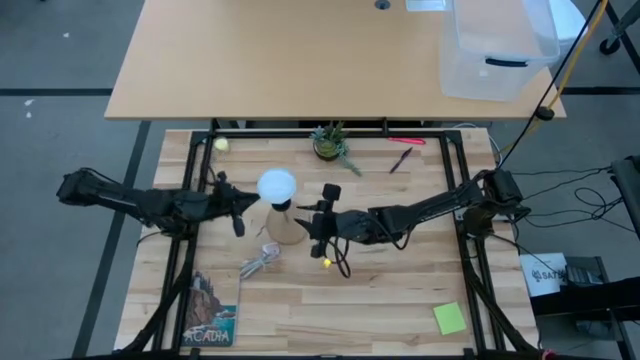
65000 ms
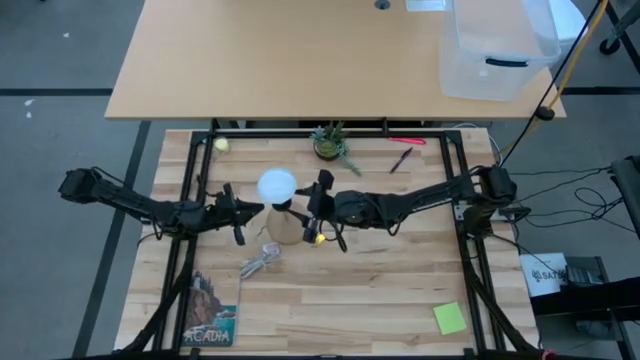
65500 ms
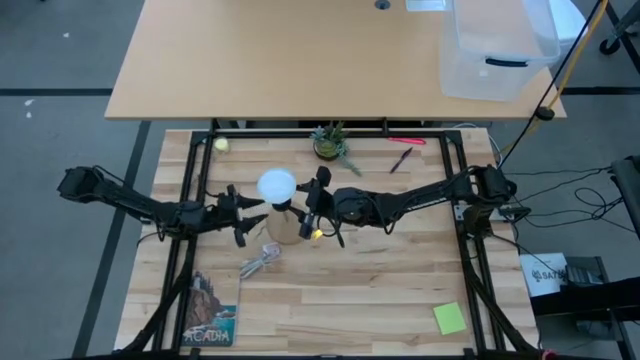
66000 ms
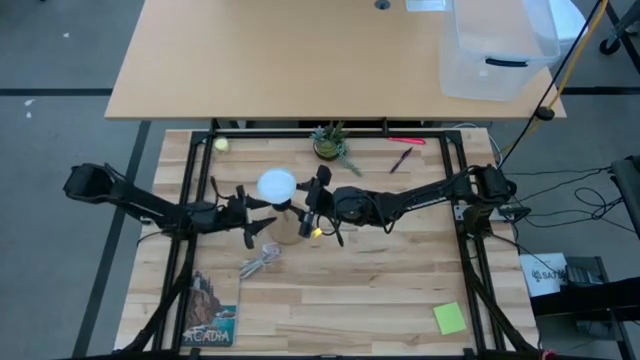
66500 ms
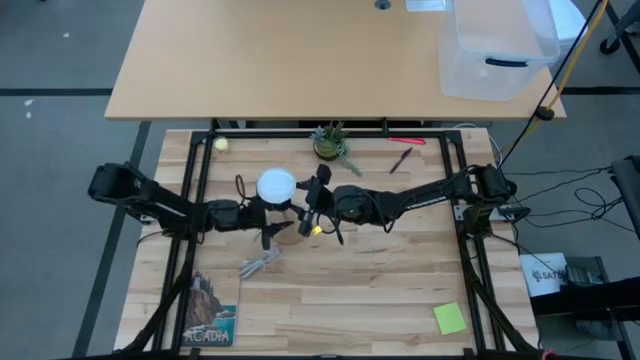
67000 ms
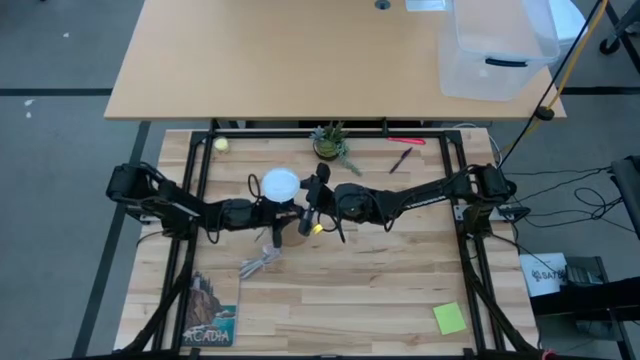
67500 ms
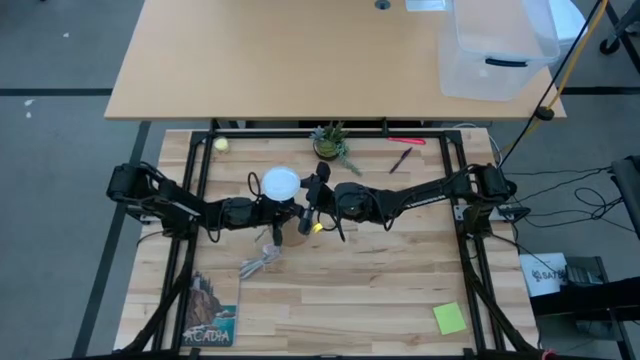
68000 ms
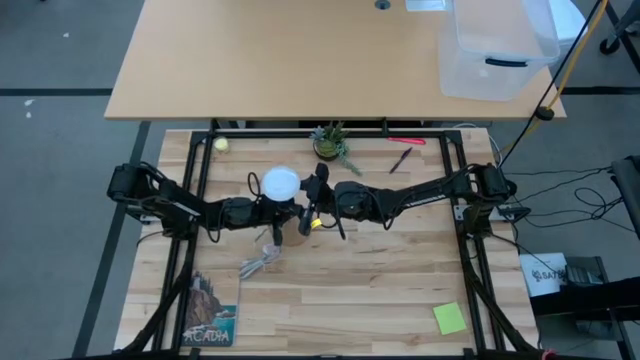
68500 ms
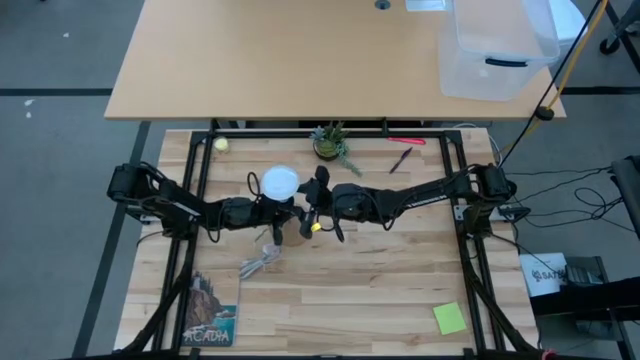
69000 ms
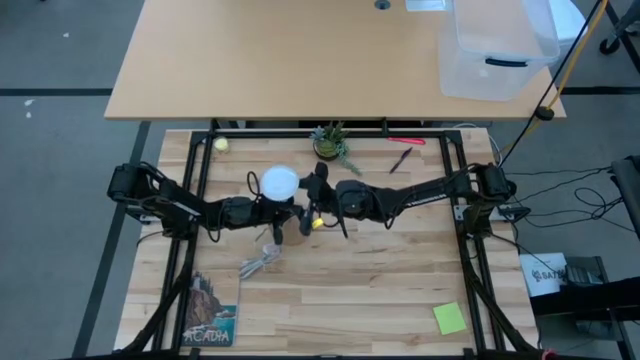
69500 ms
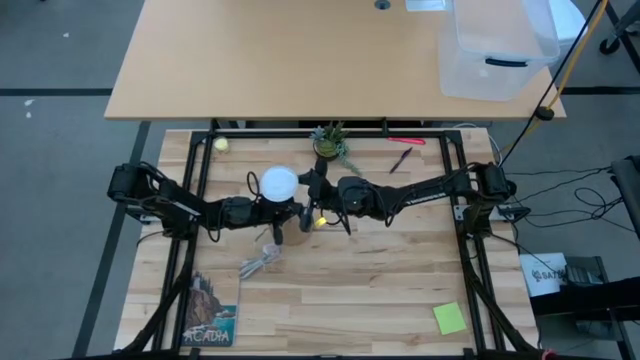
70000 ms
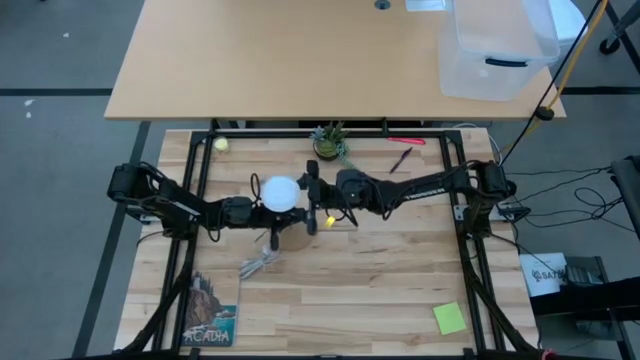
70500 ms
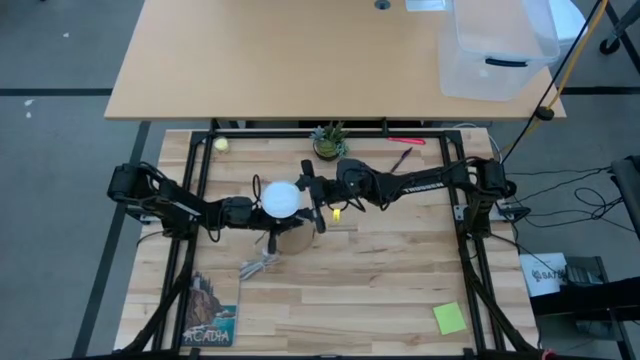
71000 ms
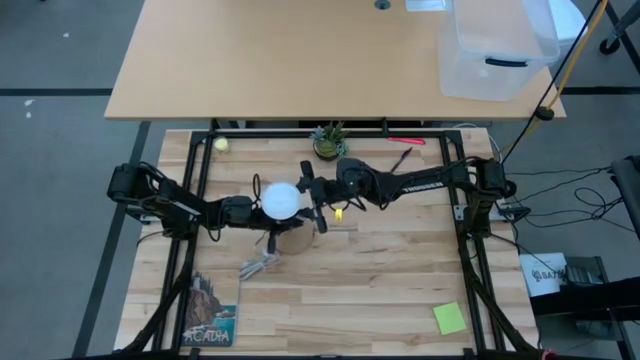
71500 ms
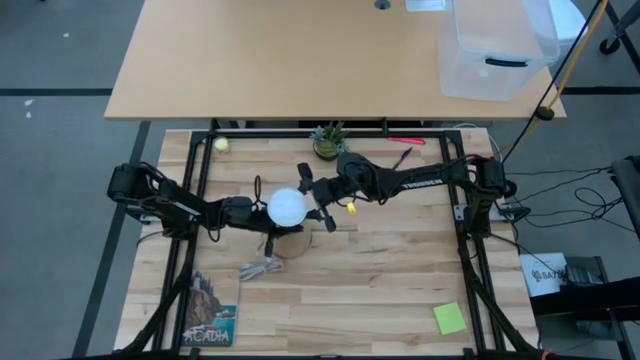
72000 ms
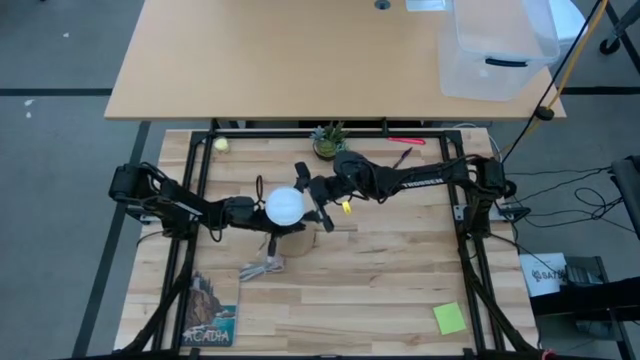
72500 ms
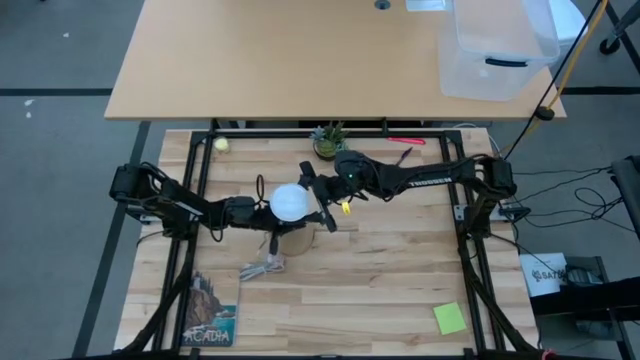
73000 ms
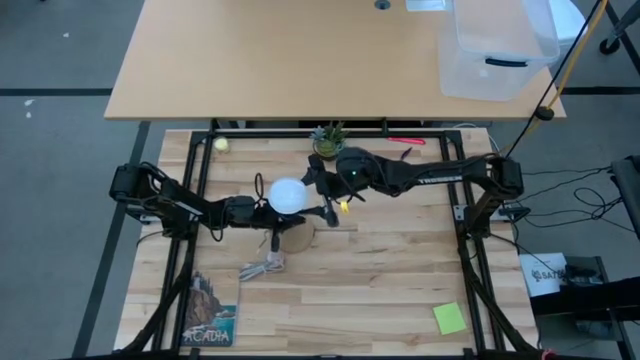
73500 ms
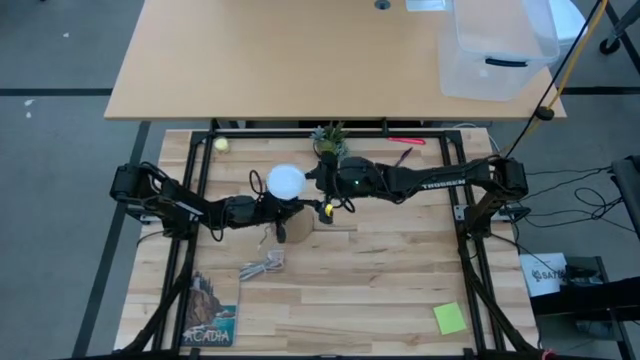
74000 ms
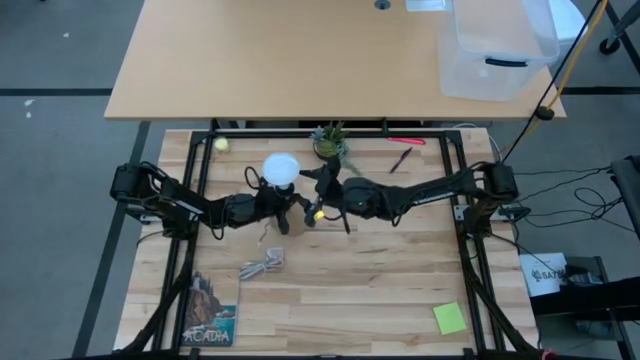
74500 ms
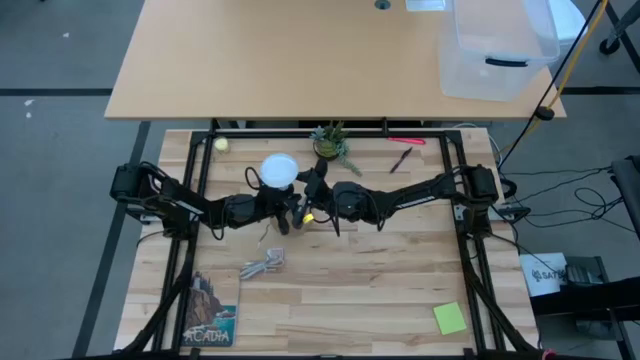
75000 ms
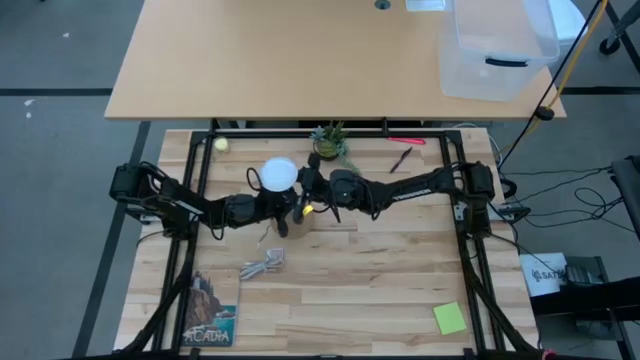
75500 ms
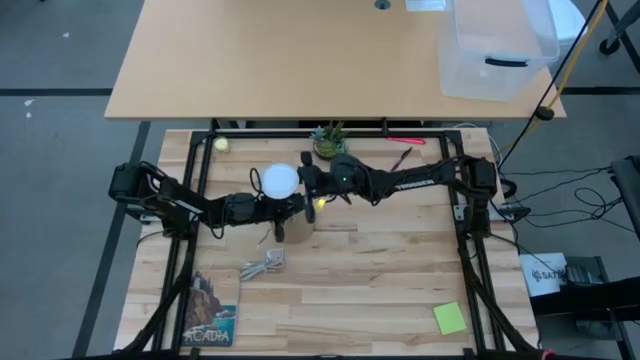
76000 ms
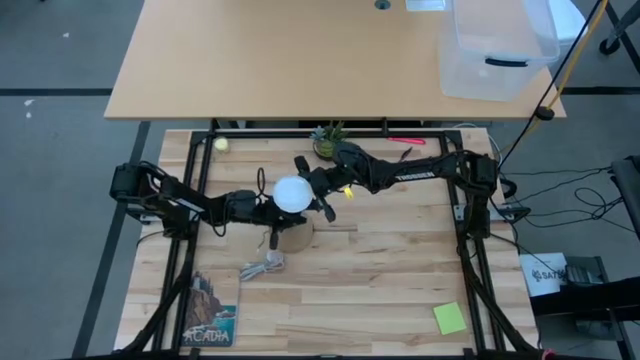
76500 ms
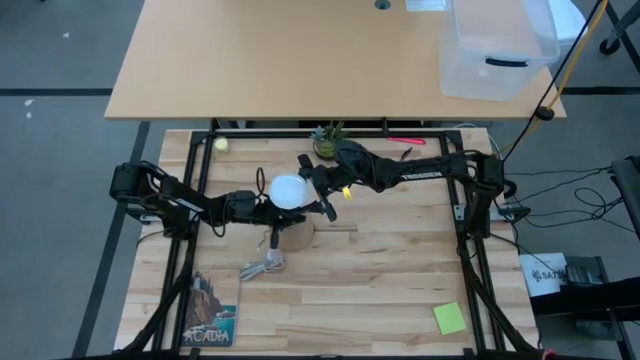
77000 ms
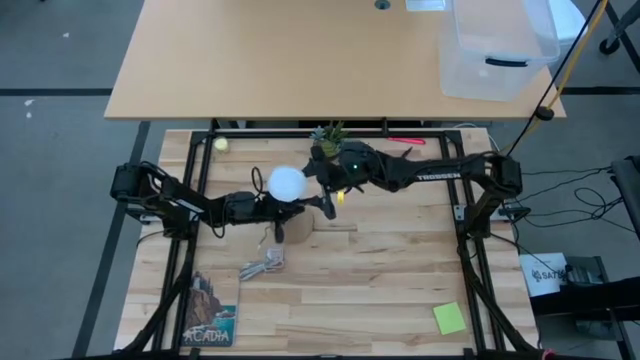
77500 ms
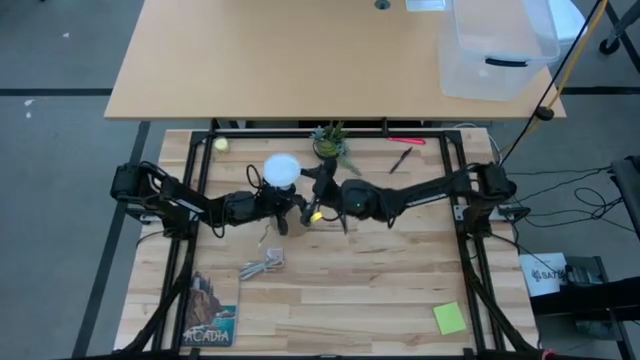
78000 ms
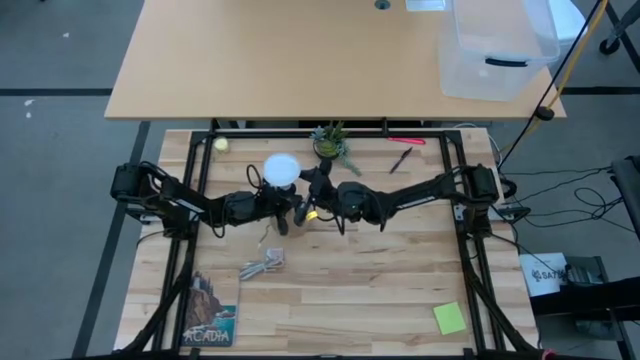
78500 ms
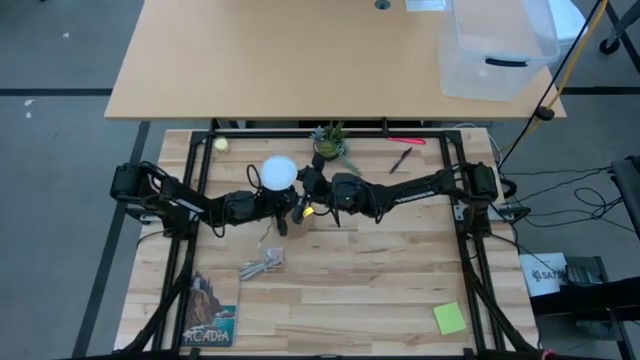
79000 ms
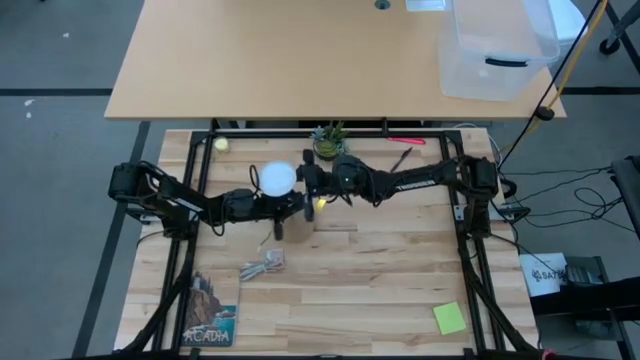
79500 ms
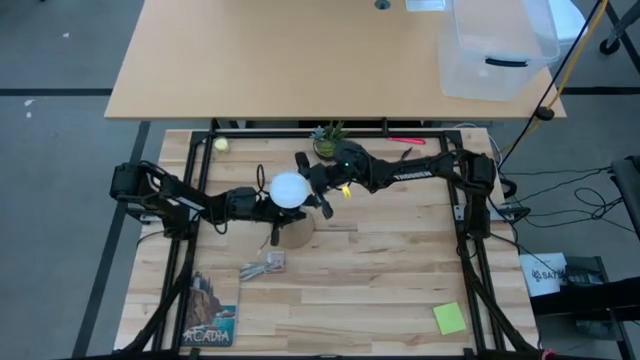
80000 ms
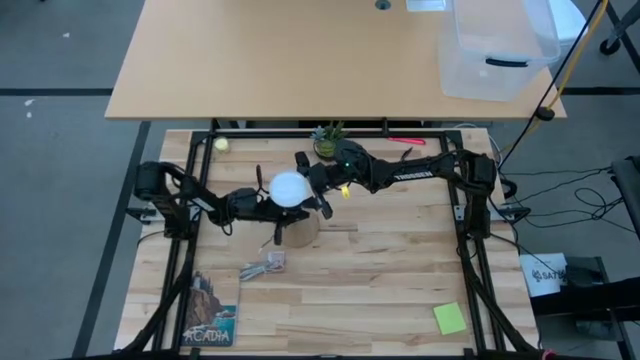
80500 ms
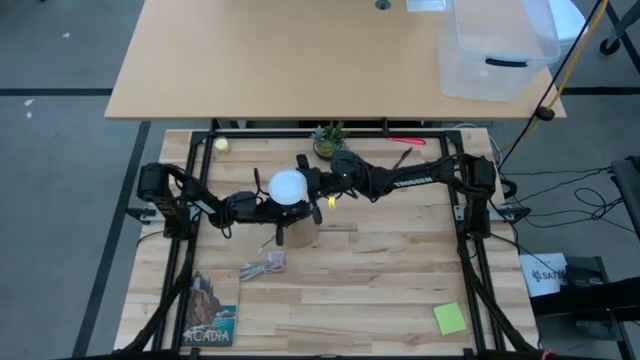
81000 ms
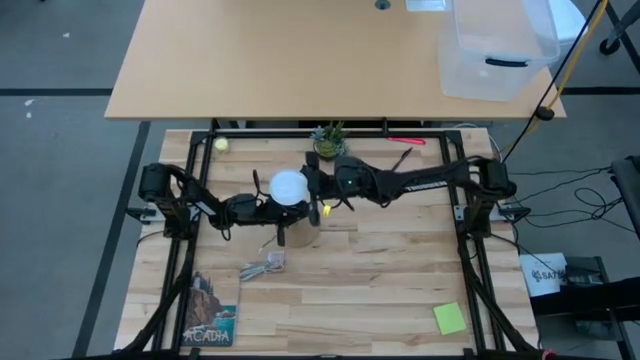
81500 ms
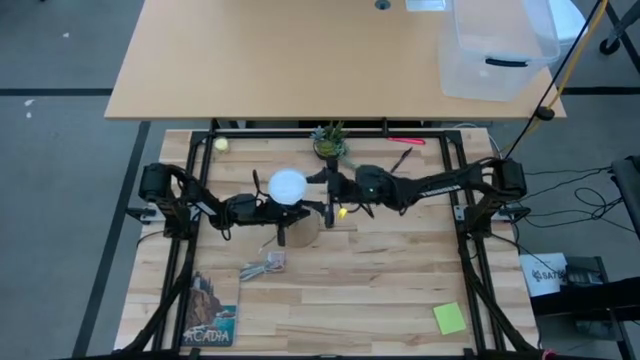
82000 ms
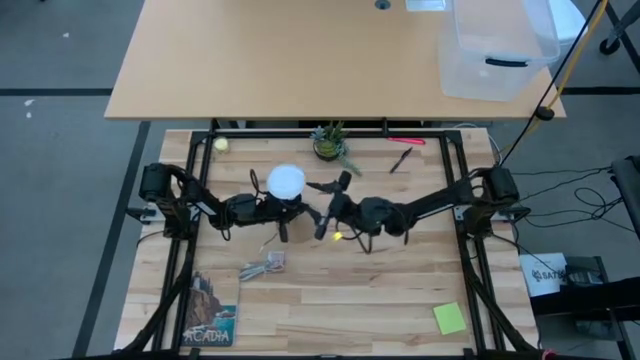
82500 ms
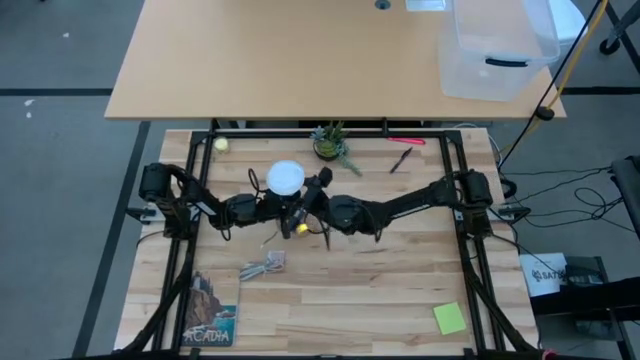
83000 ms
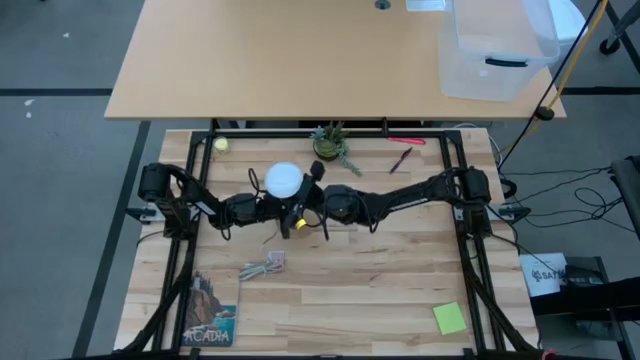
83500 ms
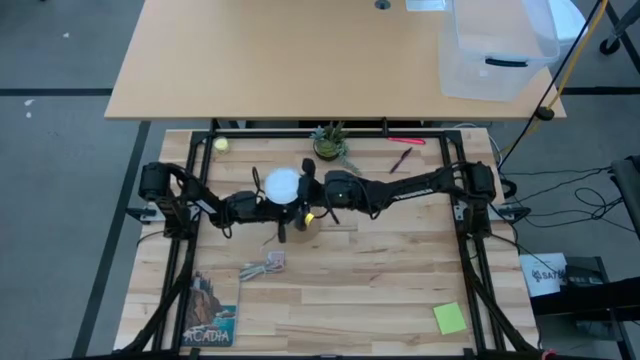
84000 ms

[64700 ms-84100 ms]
Task: Screw lightbulb
Remove the lightbulb from the lamp

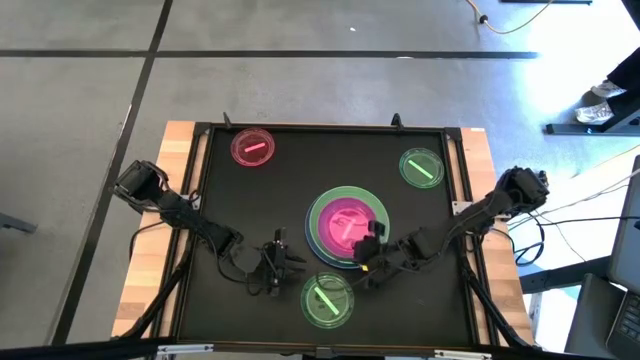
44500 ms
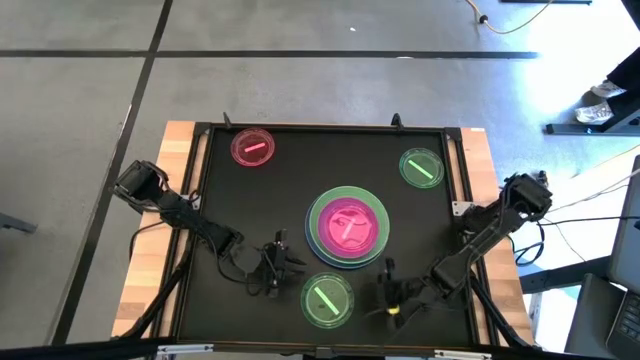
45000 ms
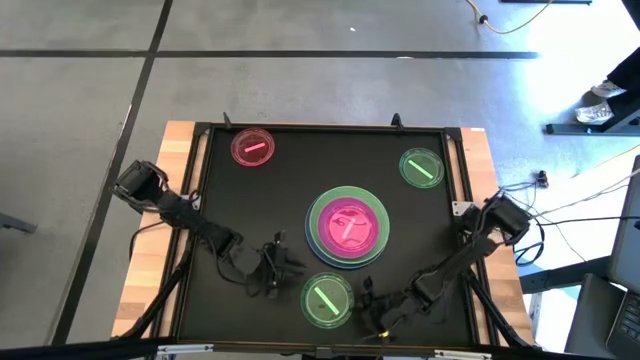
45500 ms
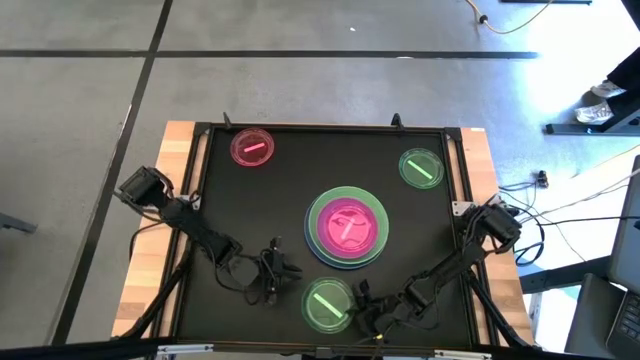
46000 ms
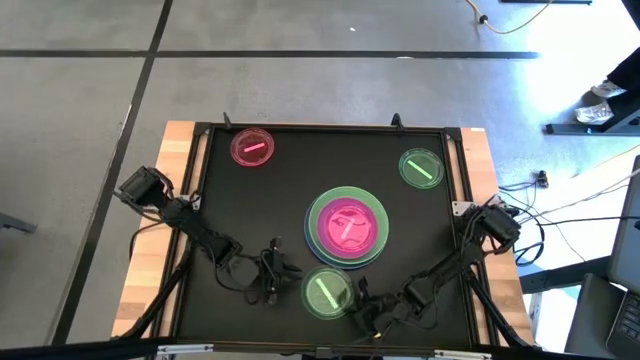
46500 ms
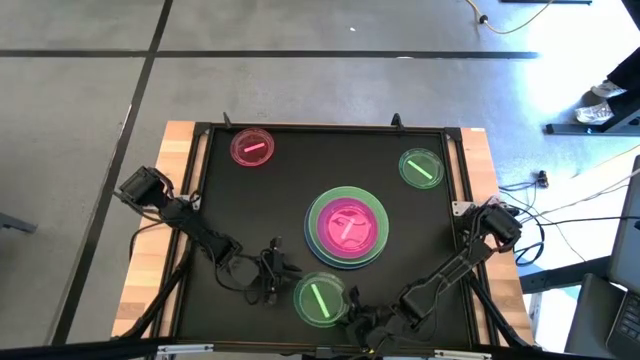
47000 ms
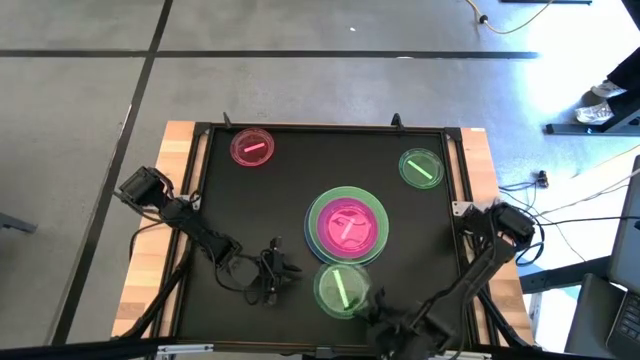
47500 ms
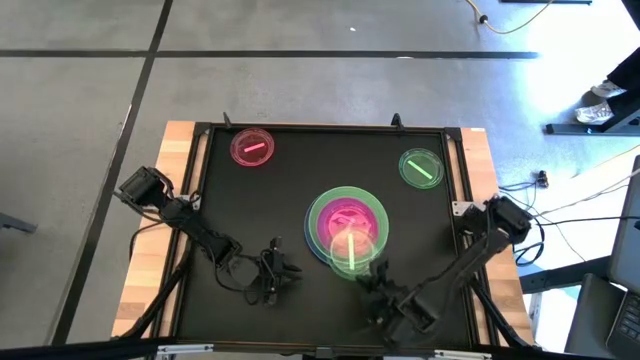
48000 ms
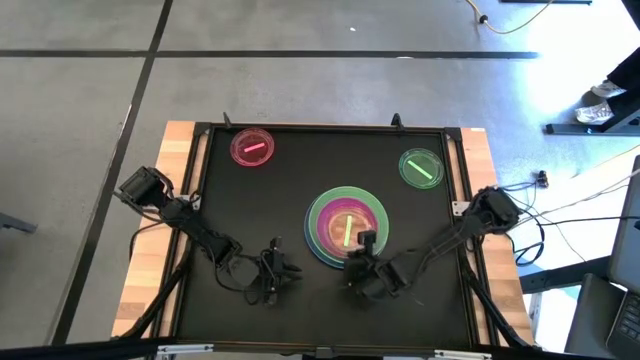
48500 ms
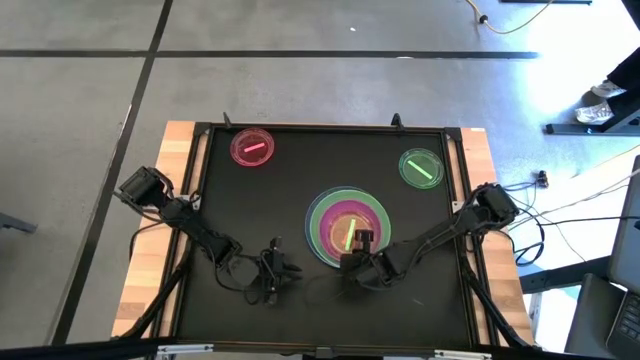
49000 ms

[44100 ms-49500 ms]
Task: Stack plastic plates
Stack the bottom light green plate on top of the red plate
